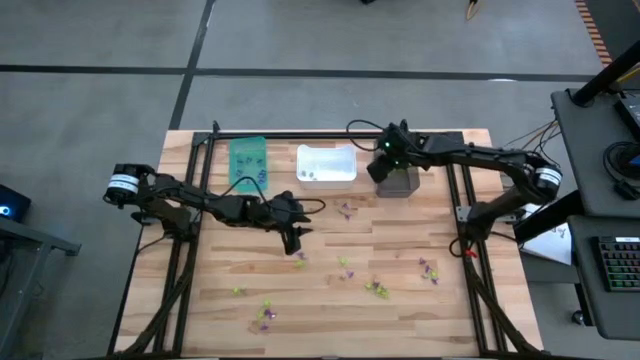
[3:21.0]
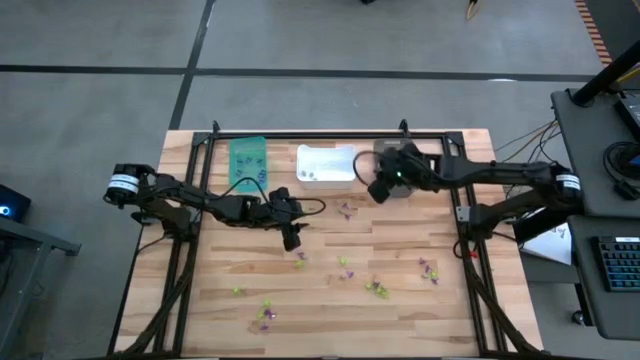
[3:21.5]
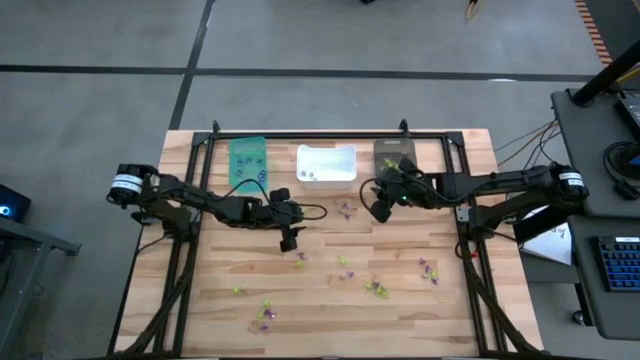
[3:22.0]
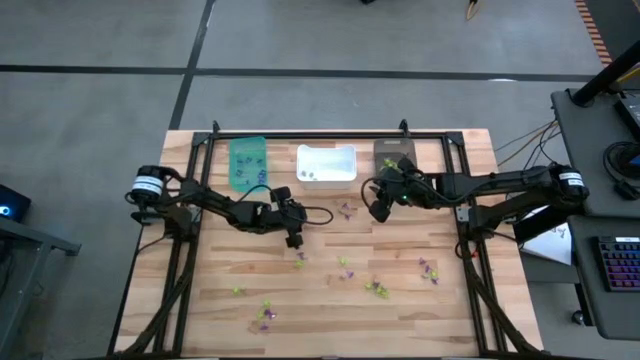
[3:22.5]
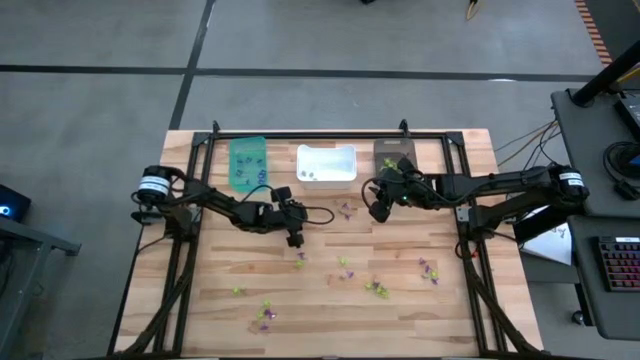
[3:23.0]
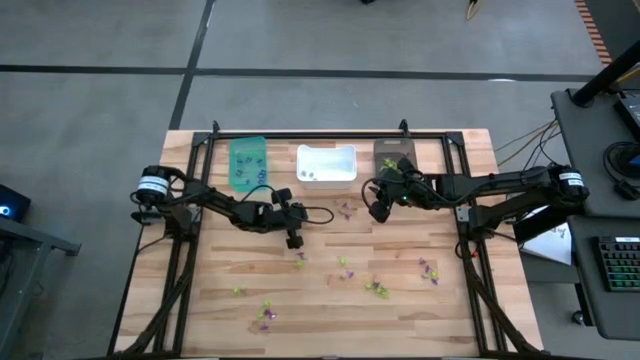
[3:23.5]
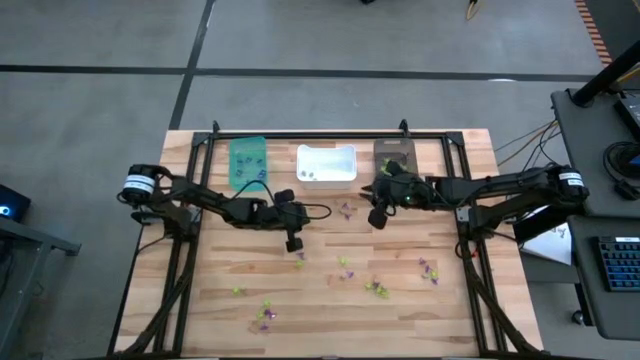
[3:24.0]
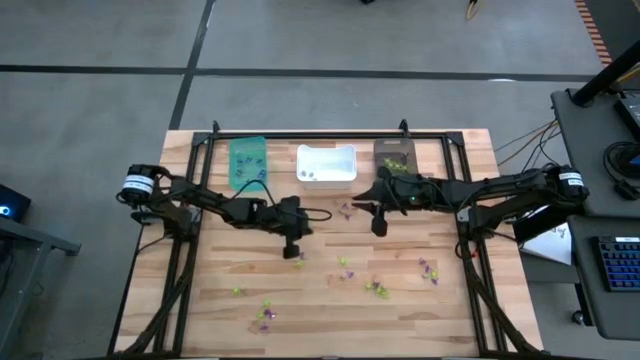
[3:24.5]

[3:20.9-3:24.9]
Task: Sort Halloween decoration
Put the green spider toy into the black bin

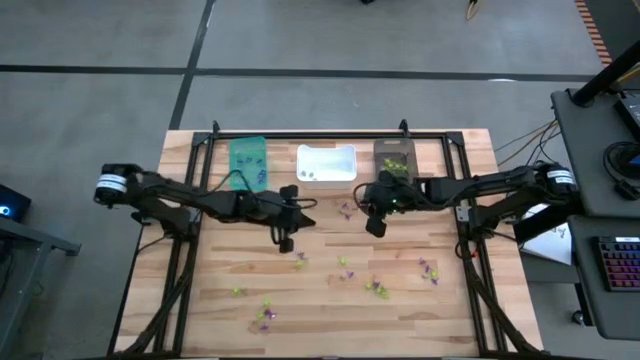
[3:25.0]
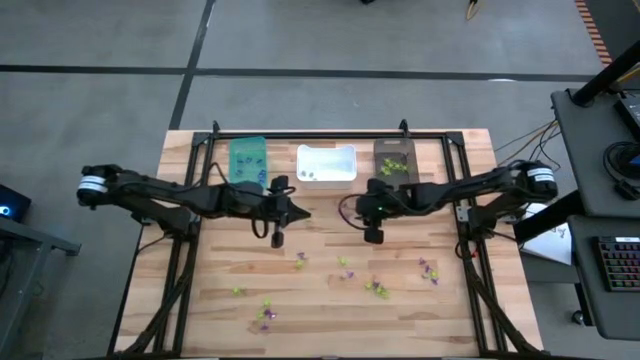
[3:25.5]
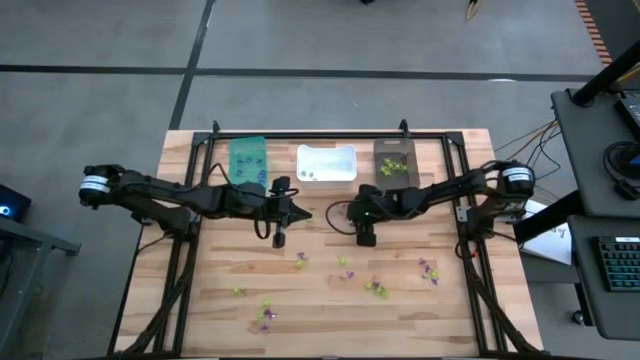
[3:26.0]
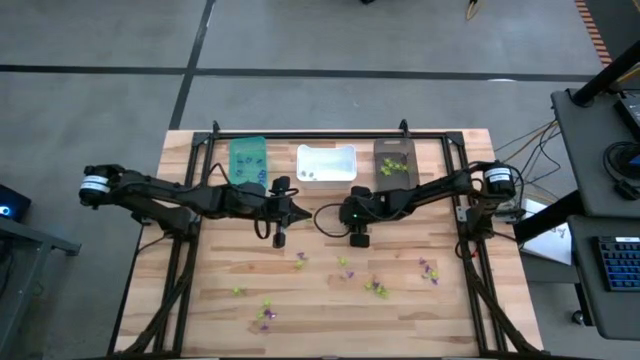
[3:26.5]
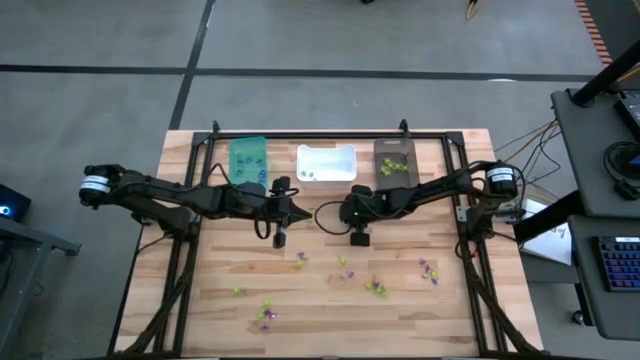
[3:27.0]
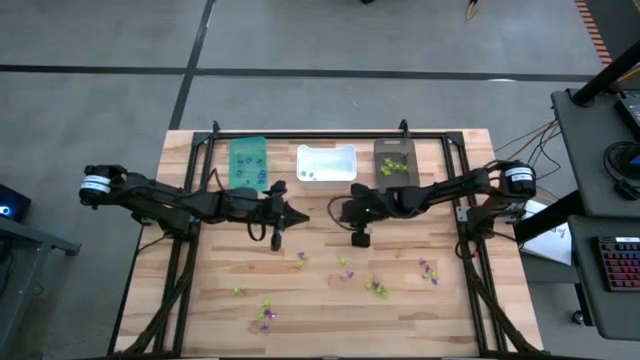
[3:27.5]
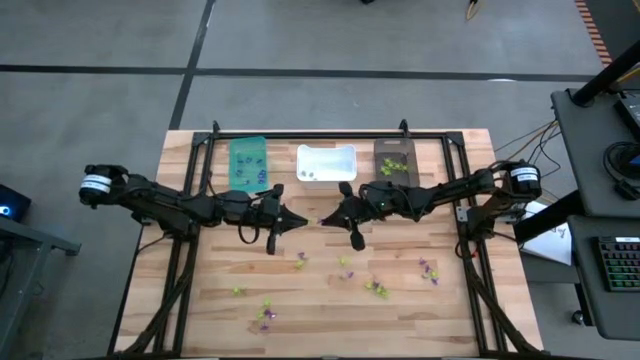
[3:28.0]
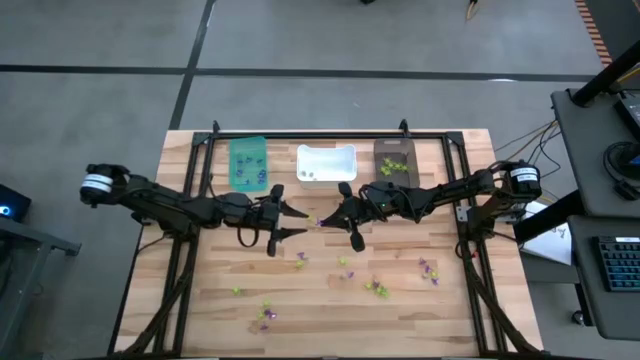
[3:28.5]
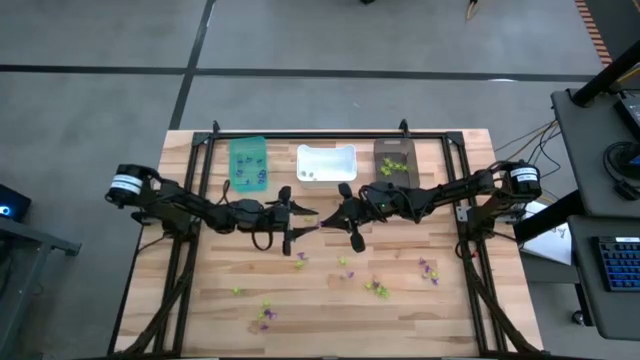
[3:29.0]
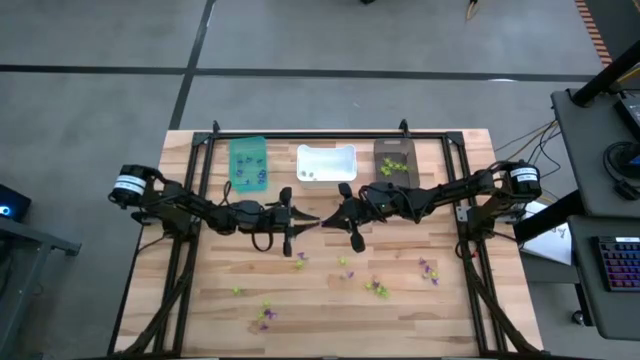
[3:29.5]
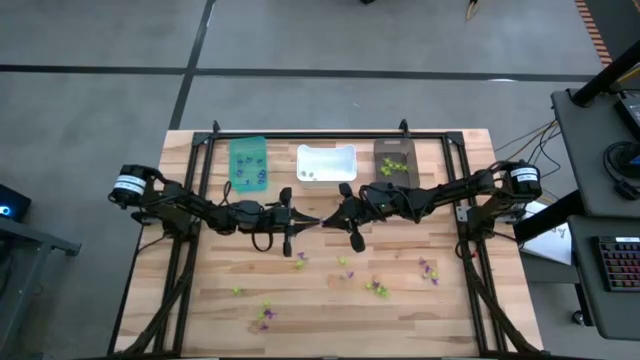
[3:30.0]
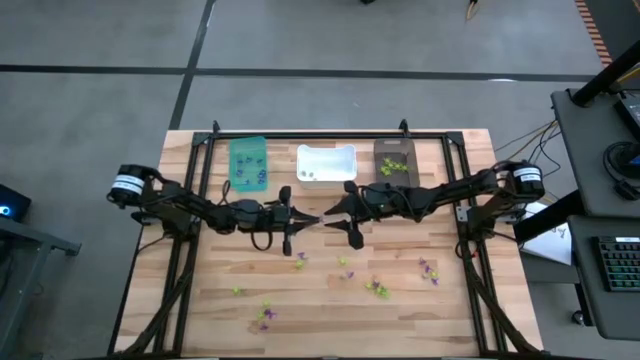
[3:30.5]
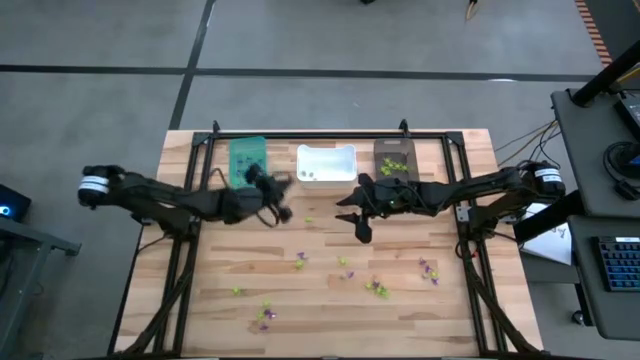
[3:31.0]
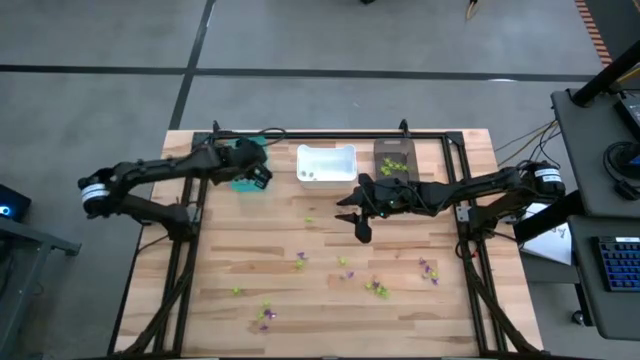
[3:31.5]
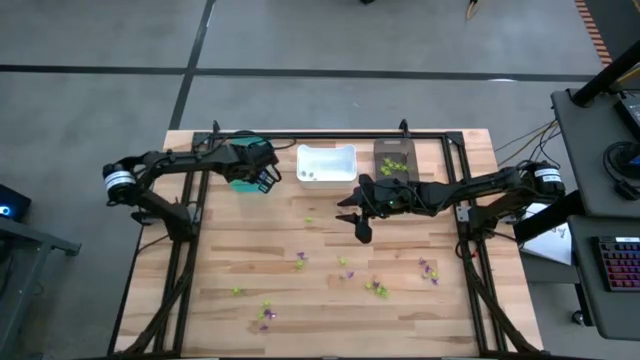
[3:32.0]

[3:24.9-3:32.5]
Put the purple witch hat toy into the light blue bin

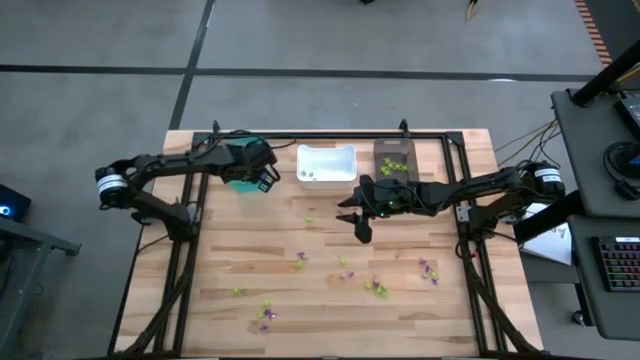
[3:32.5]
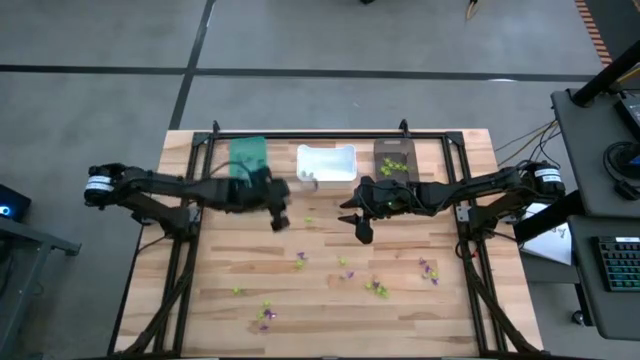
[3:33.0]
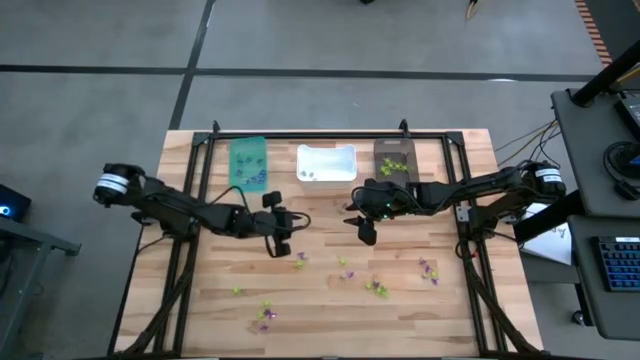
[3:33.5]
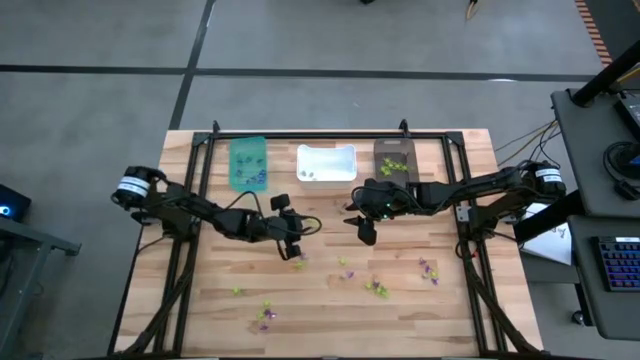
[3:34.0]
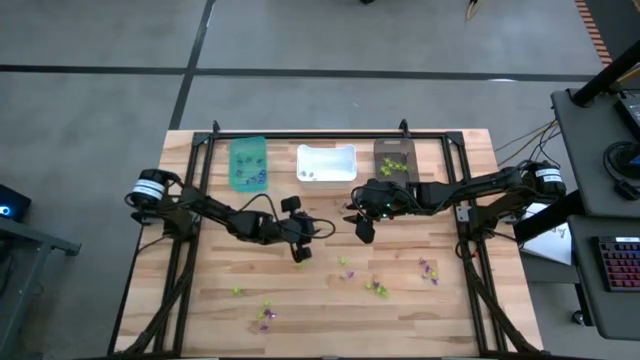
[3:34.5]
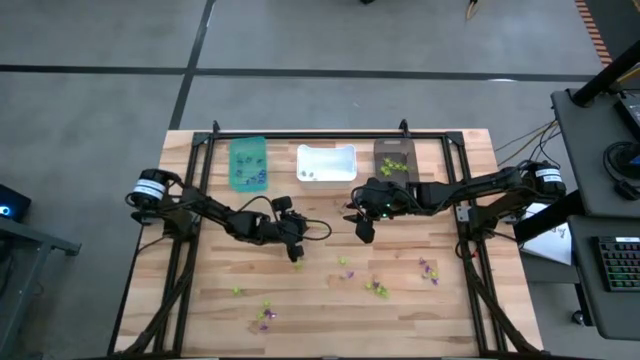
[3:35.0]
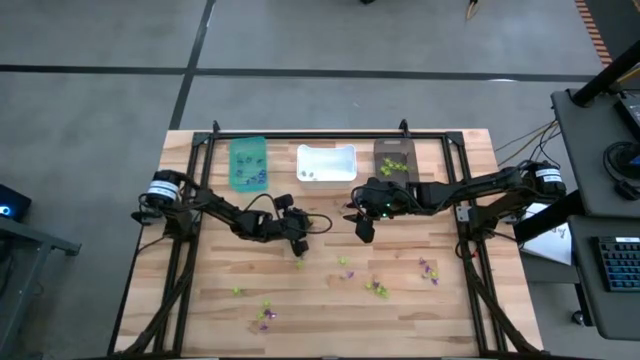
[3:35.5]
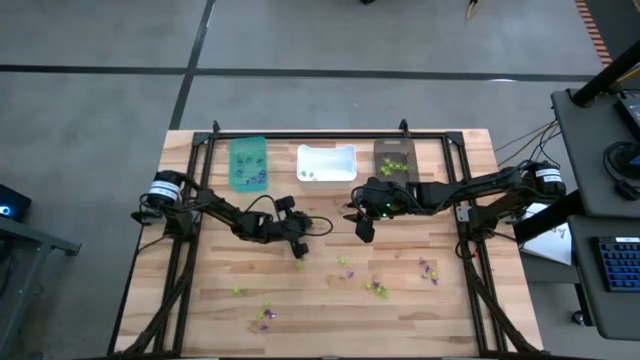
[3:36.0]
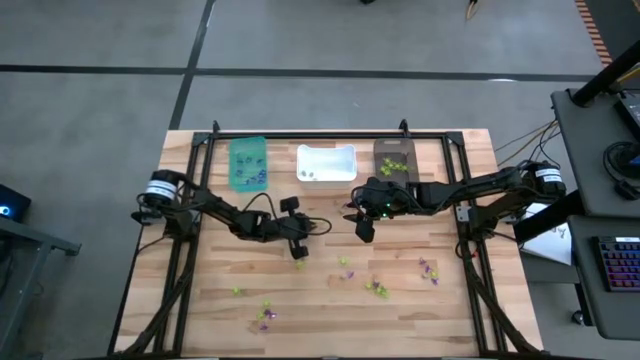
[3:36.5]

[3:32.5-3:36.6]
Put the green spider toy into the black bin

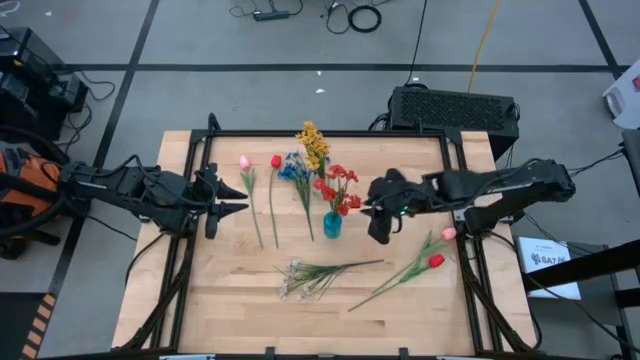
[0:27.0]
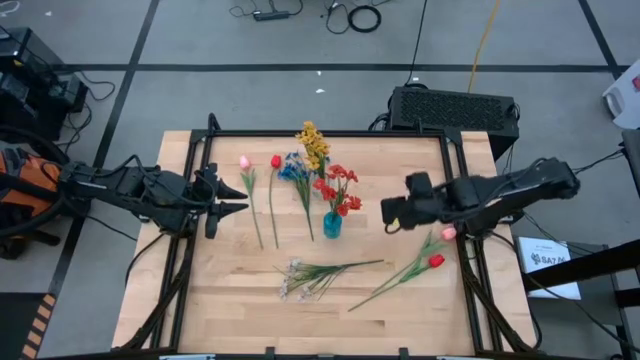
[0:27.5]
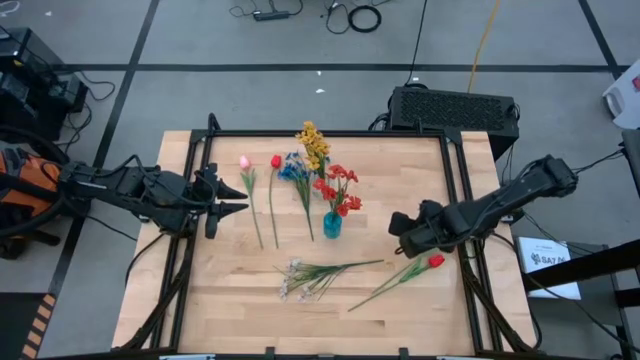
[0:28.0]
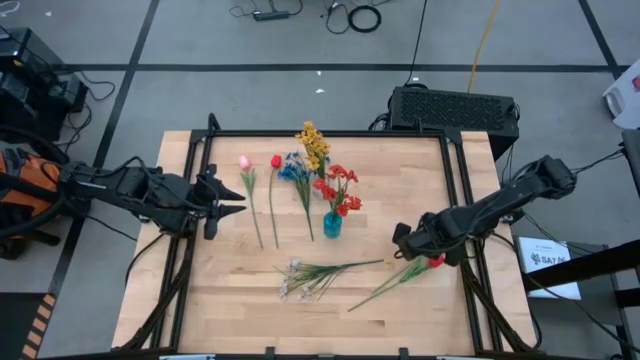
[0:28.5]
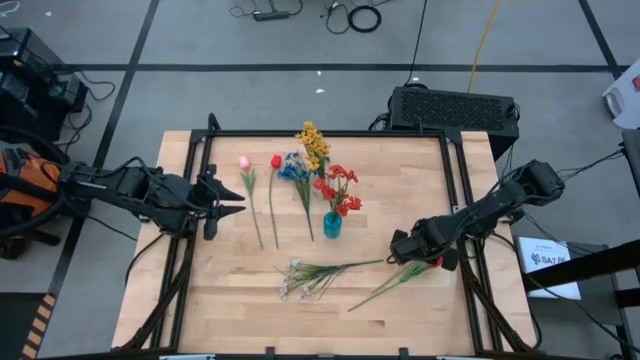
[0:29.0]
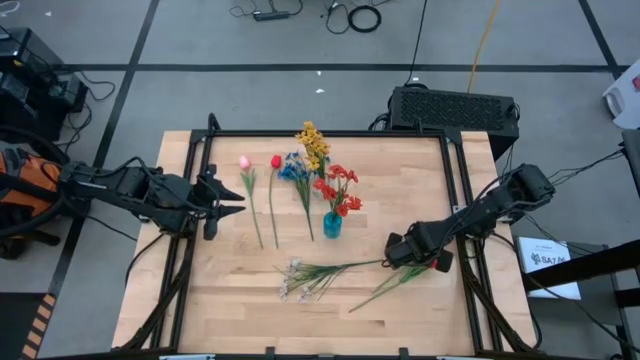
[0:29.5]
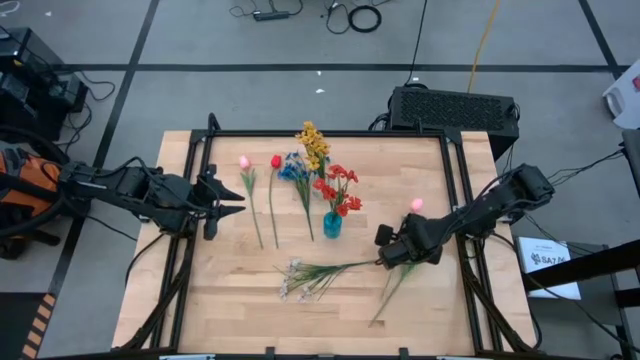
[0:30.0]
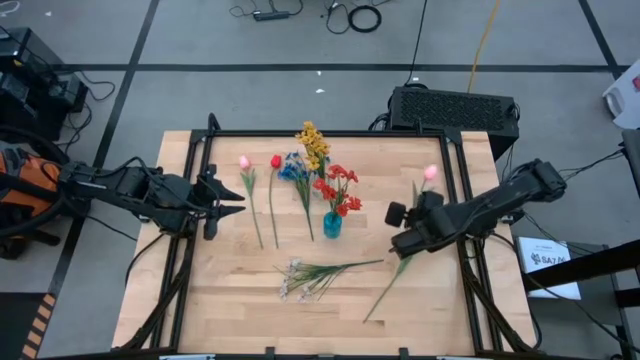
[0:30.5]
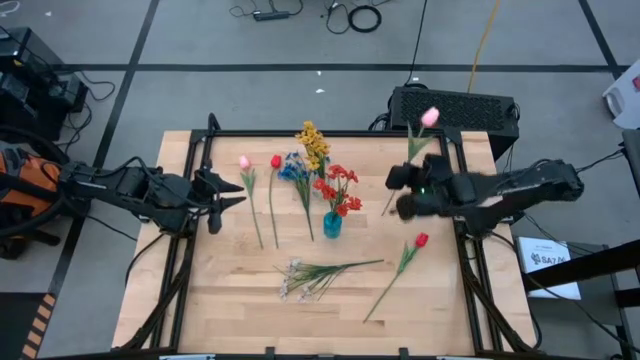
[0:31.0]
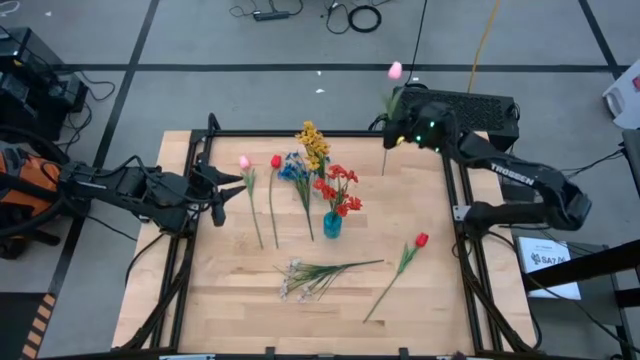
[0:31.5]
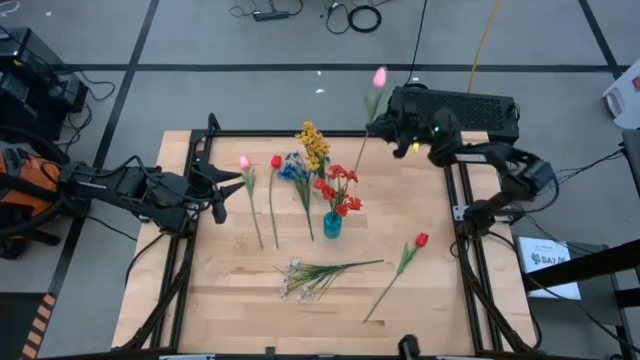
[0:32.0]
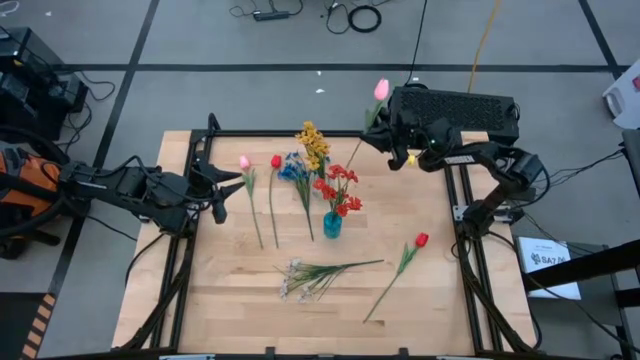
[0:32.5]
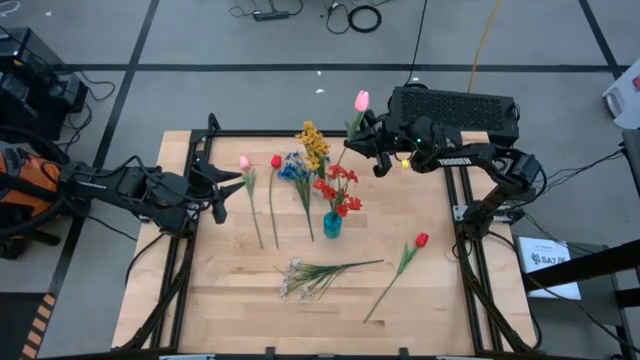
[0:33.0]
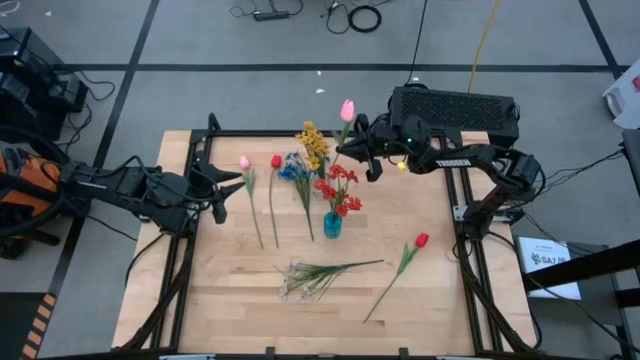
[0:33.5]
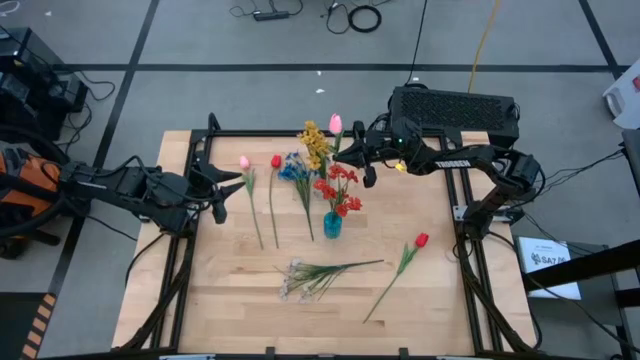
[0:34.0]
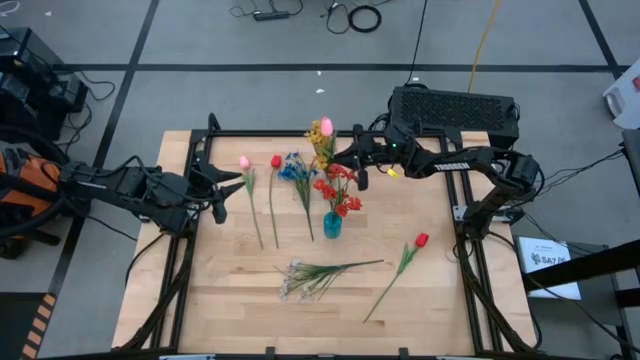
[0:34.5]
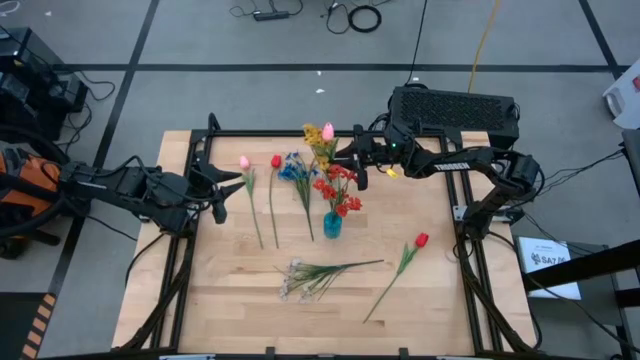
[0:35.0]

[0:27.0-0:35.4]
Task: Sort flowers into vase by color
Put the right pink tulip into the transparent vase
